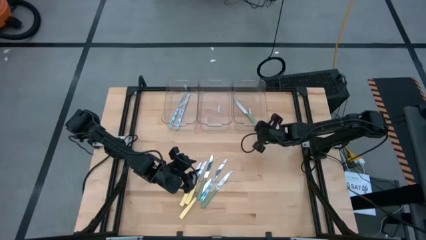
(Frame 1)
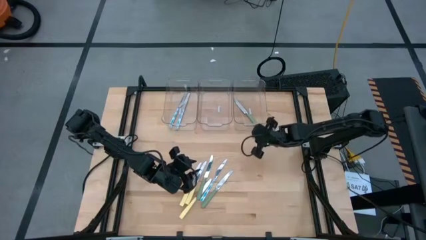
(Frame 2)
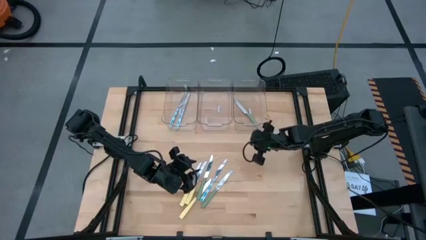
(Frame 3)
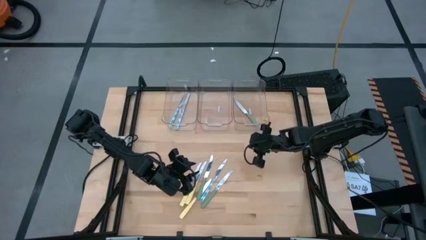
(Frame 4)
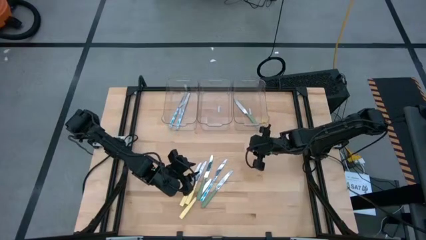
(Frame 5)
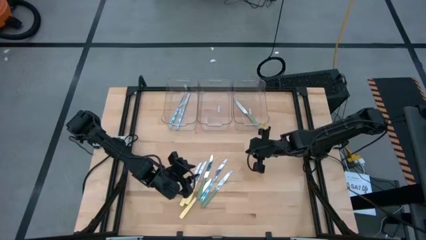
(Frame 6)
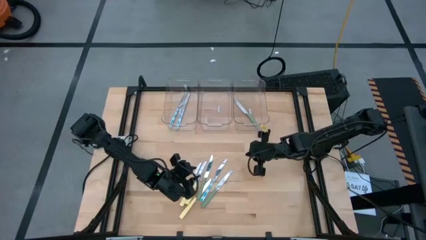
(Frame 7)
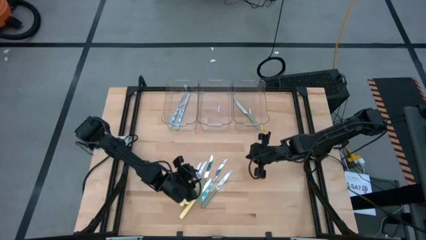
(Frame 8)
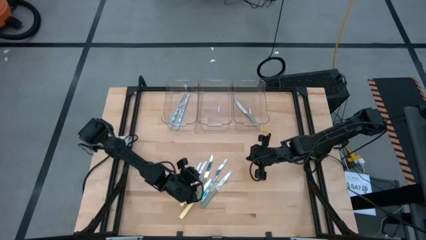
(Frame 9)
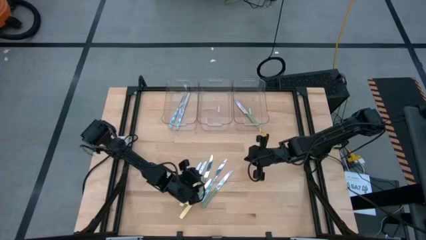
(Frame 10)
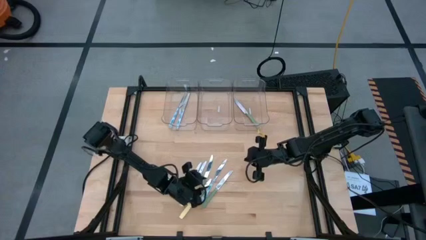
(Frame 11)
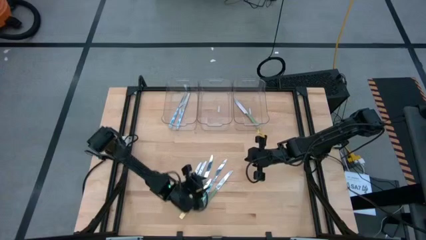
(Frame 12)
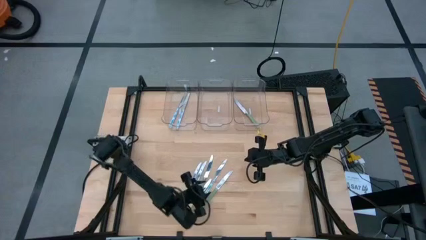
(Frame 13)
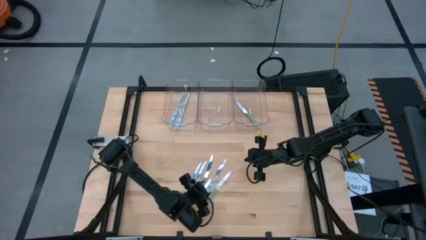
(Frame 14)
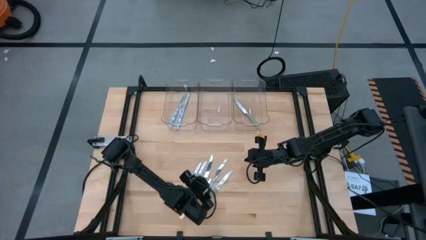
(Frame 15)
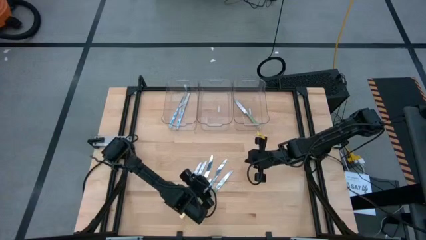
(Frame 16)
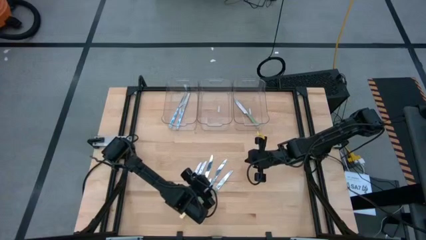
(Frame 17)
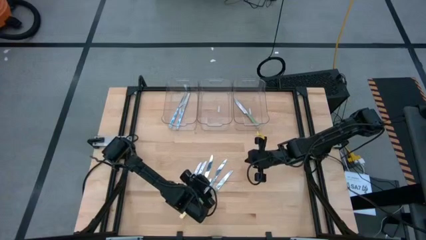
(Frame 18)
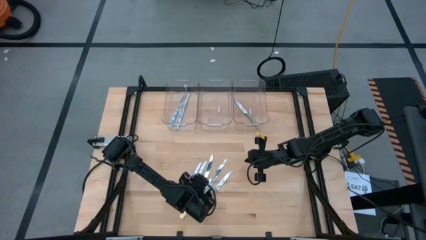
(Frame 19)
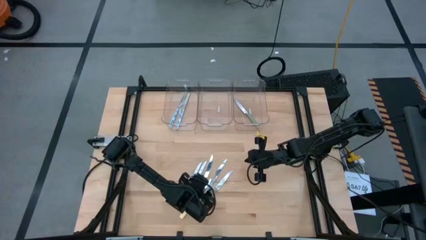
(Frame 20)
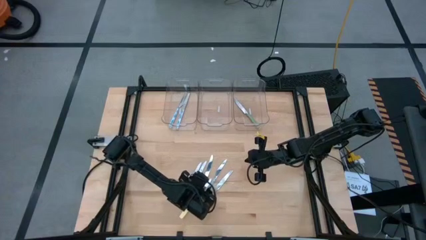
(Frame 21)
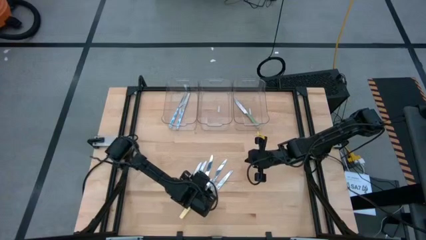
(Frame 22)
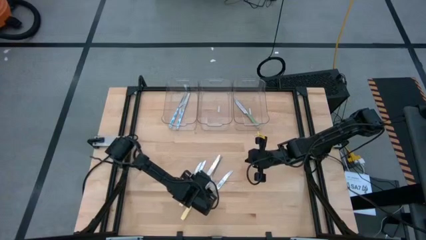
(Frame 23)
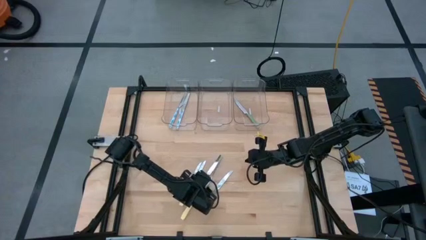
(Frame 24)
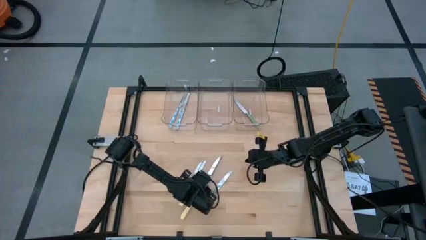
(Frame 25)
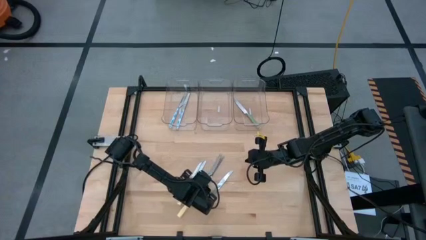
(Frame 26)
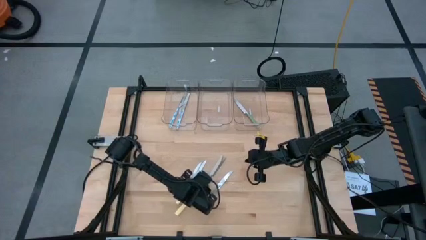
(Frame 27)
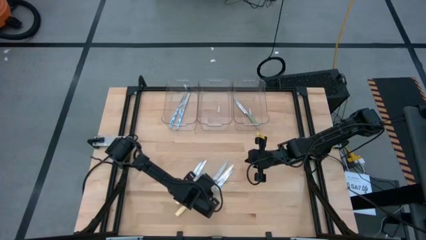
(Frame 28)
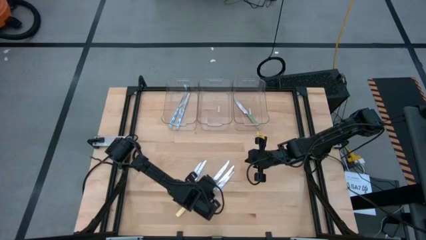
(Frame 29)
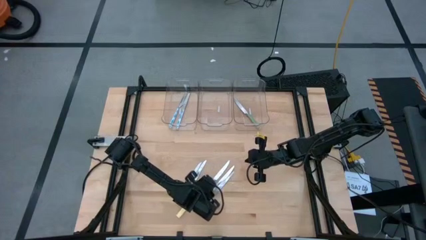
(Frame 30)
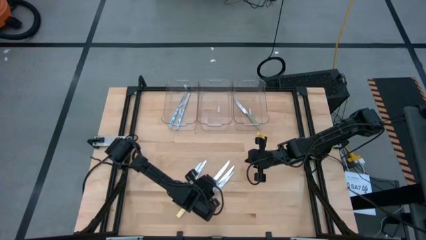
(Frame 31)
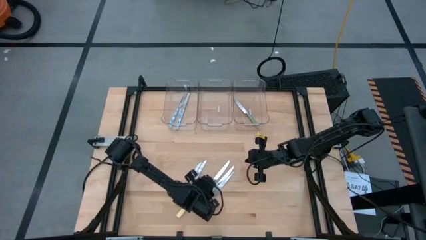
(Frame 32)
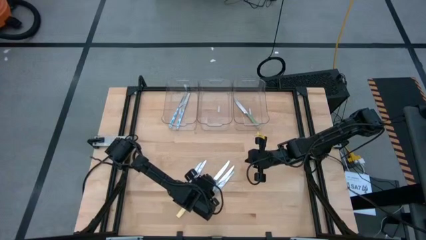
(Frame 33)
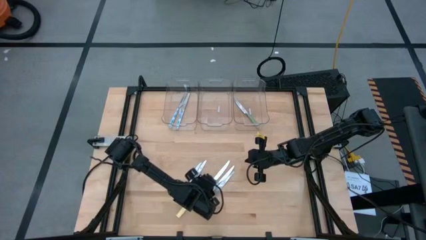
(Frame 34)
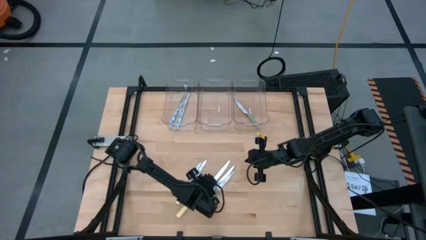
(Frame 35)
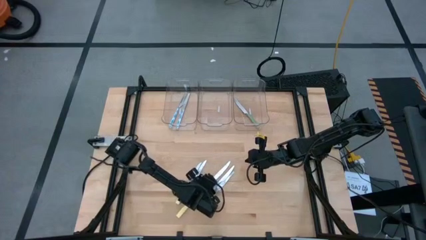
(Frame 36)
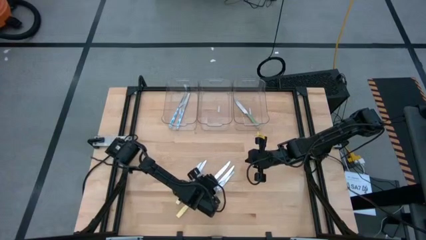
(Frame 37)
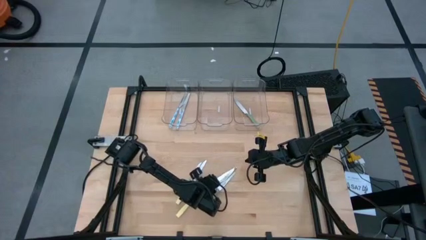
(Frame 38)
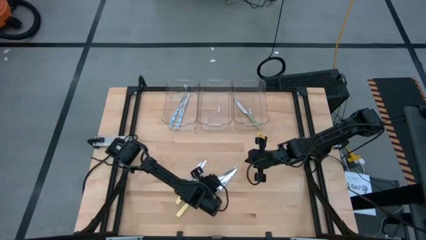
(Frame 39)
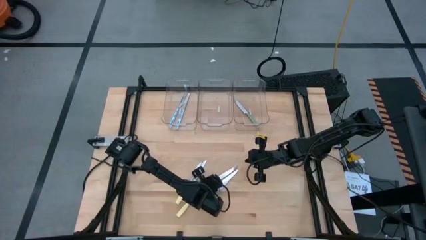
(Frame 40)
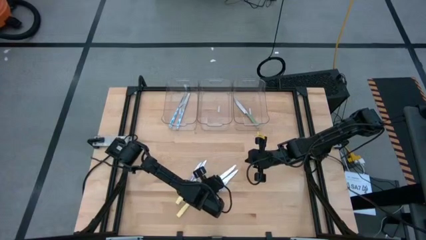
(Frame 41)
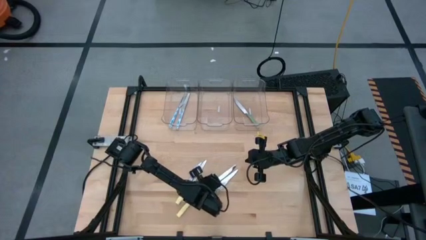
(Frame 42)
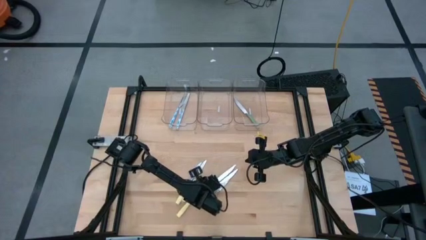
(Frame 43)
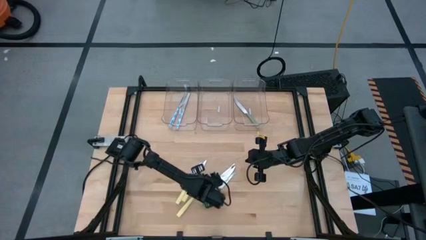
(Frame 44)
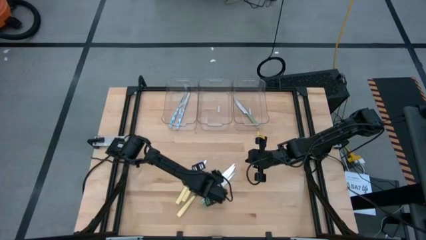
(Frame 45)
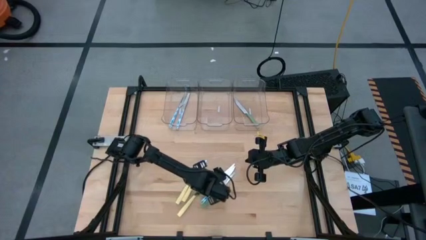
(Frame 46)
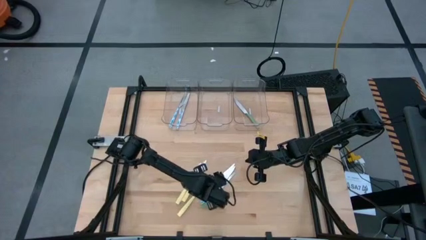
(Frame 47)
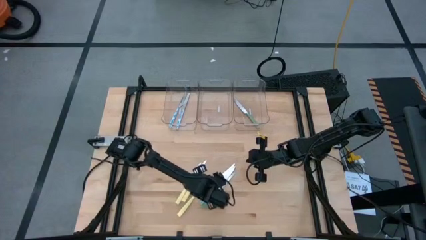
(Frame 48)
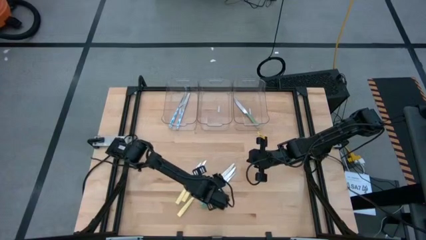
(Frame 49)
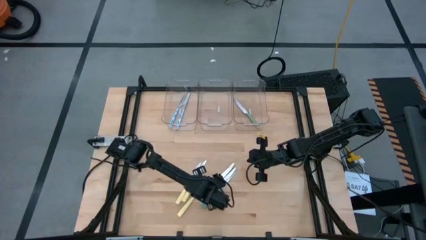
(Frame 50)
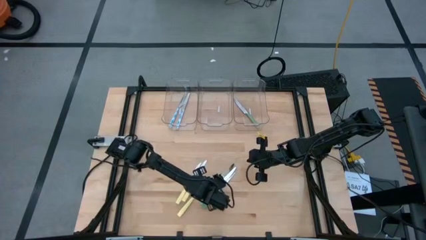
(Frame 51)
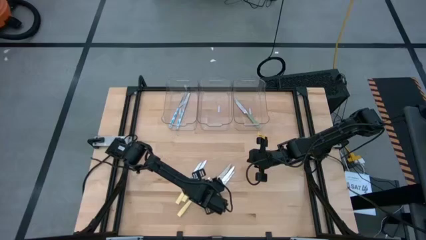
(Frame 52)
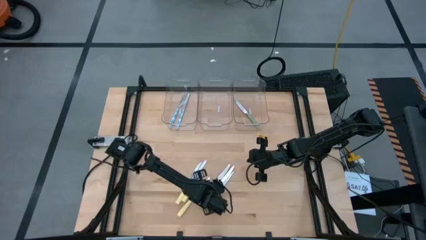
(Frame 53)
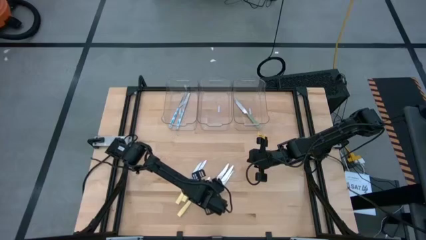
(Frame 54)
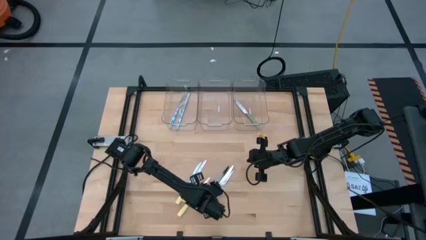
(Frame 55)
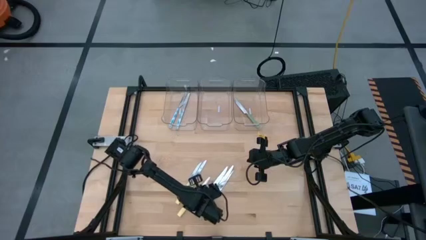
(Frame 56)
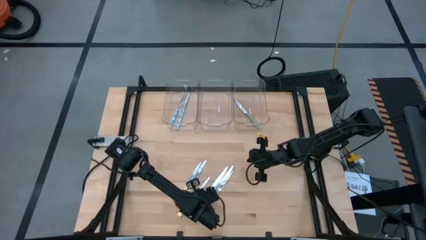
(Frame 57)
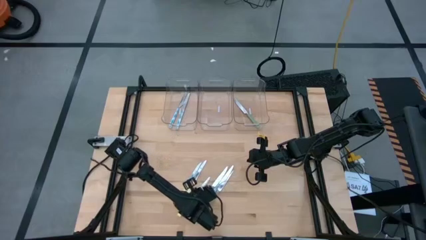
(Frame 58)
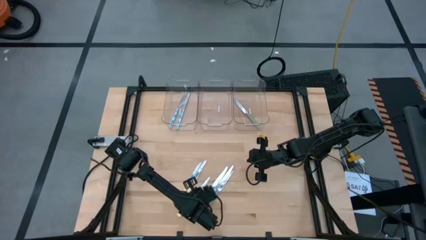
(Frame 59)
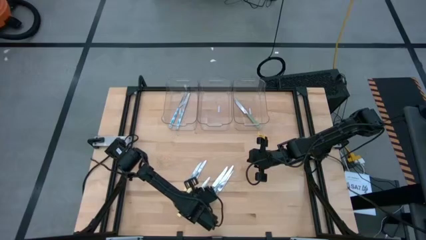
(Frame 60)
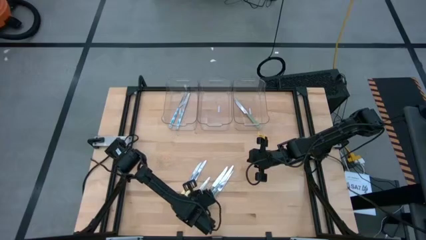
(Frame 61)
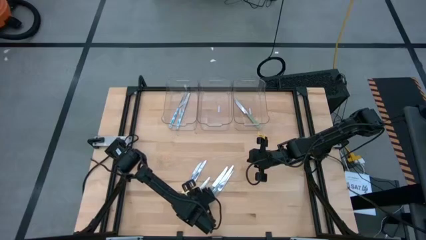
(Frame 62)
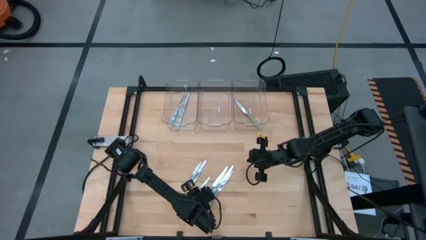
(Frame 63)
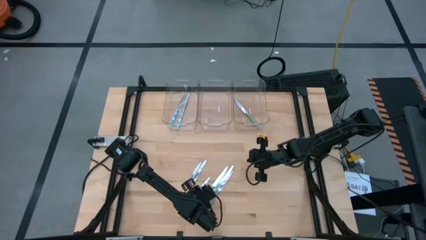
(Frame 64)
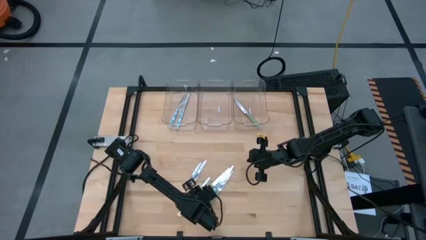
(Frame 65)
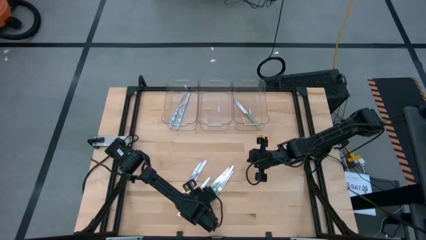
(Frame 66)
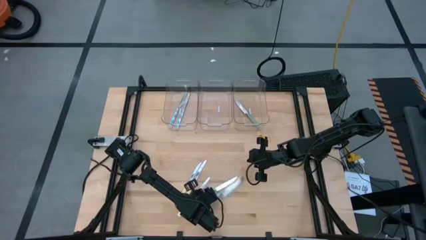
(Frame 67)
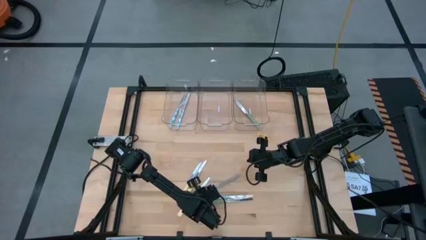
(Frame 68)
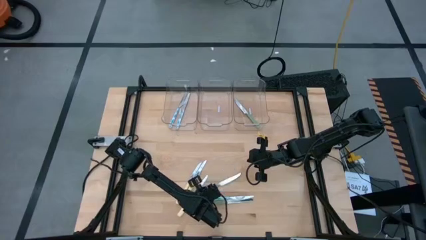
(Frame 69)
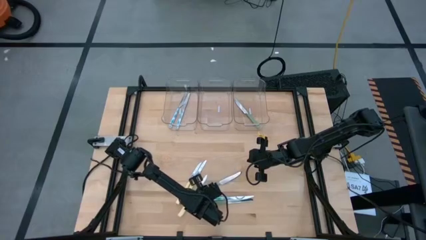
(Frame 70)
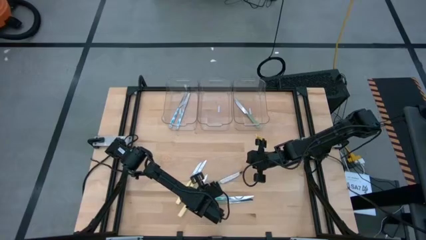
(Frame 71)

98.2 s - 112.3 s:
Task: Sort silverware by color (type)
Put the green knife into the right transparent bin

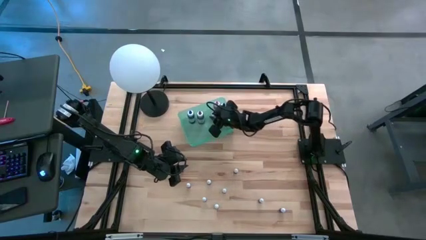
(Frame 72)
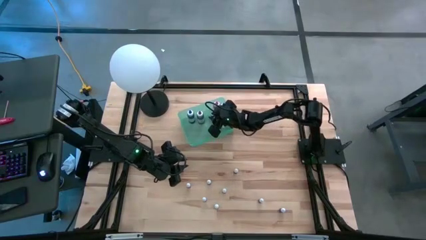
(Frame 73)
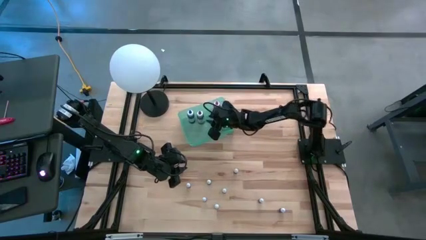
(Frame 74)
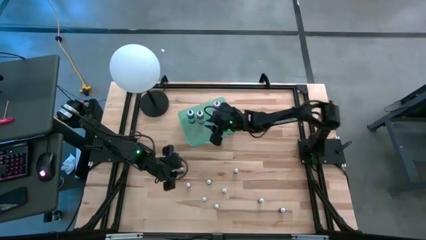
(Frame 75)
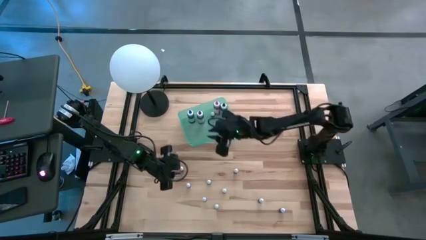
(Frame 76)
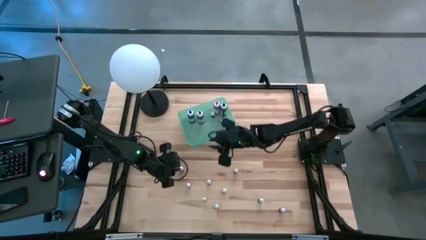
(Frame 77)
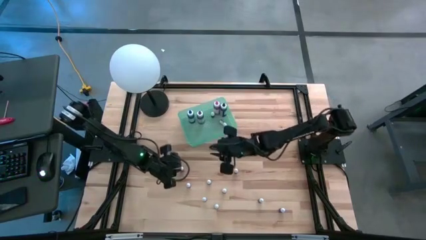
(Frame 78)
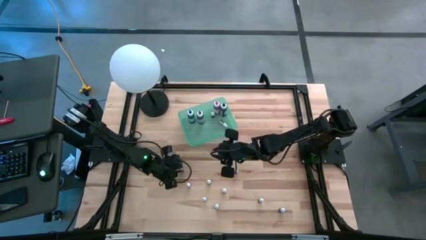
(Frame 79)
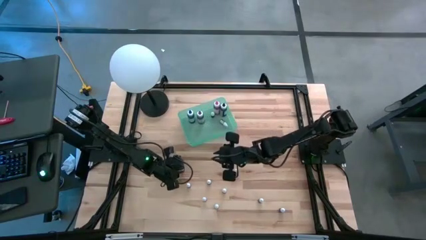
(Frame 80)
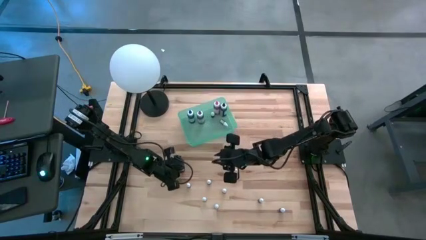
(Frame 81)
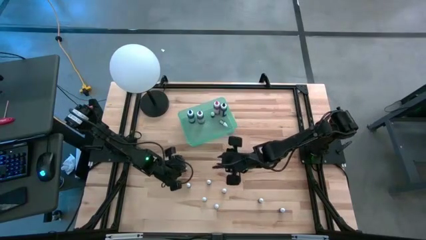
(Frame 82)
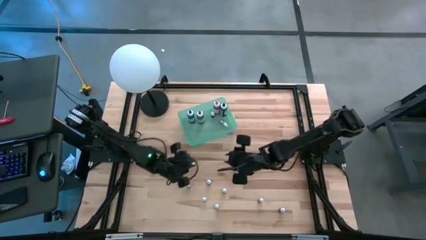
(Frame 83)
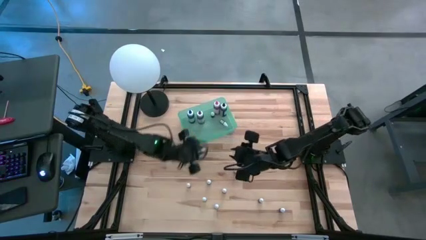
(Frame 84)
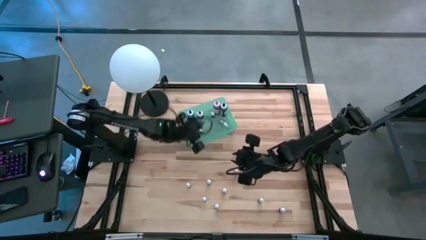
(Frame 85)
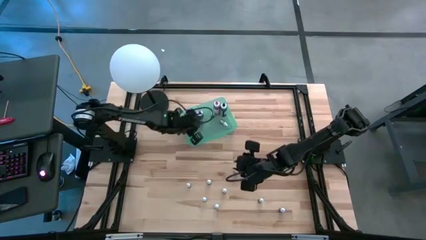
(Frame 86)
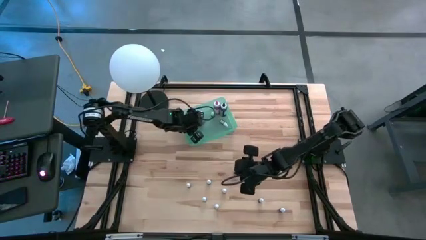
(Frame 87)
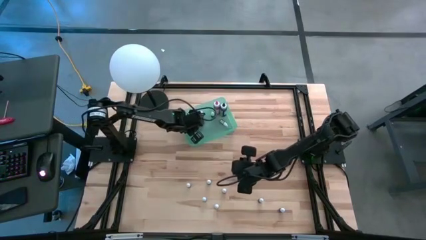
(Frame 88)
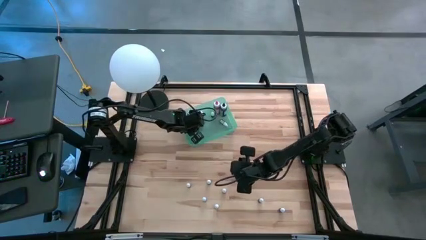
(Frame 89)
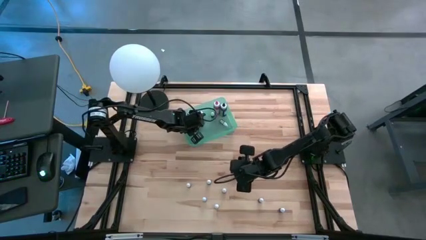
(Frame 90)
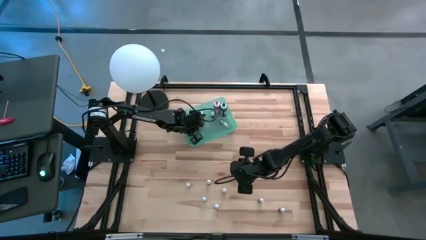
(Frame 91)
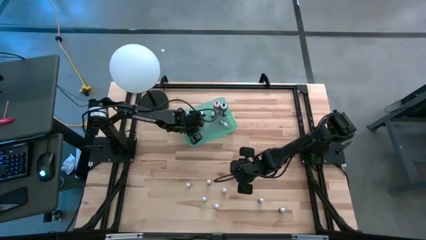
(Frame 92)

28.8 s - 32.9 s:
Task: Pick & Place food coloring
Put the small orange bottle into the blue bin
